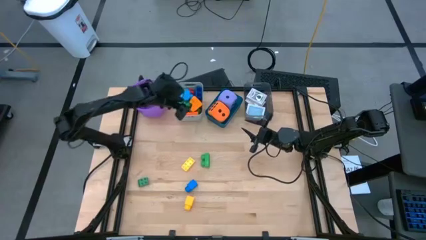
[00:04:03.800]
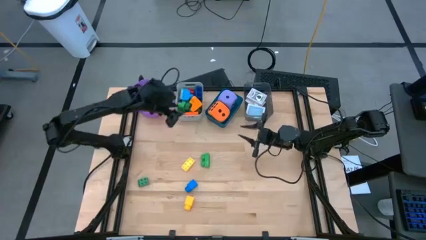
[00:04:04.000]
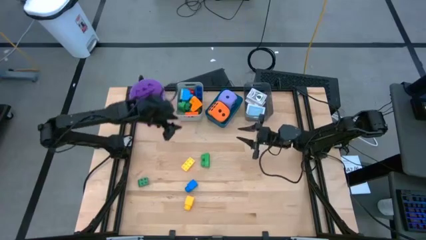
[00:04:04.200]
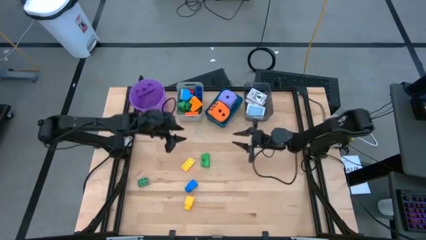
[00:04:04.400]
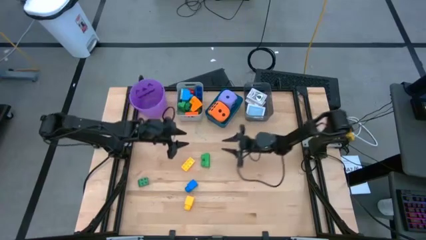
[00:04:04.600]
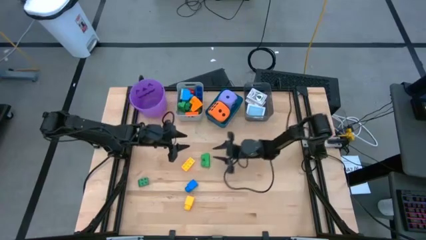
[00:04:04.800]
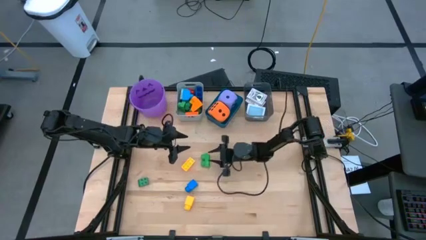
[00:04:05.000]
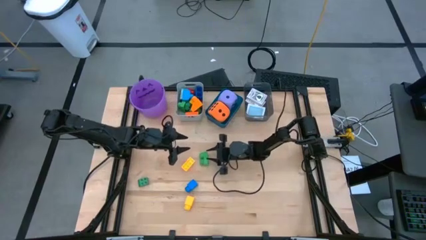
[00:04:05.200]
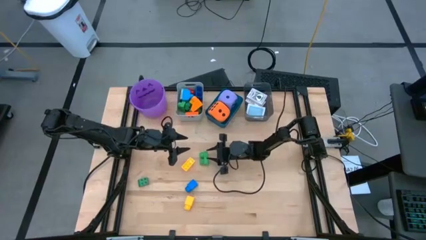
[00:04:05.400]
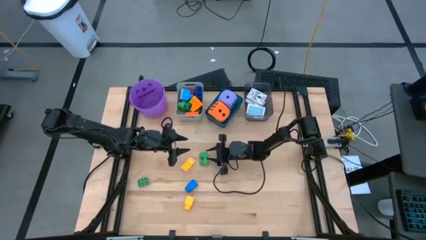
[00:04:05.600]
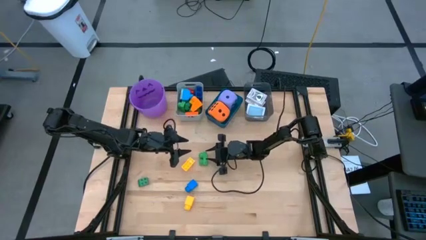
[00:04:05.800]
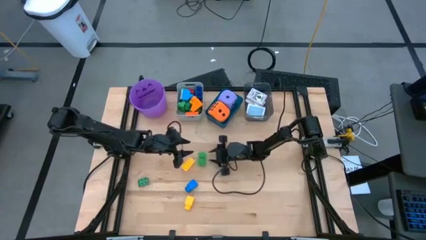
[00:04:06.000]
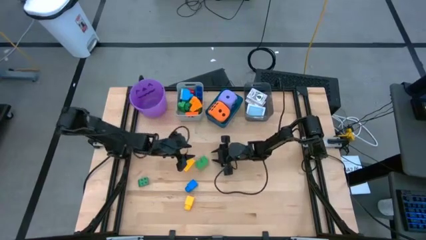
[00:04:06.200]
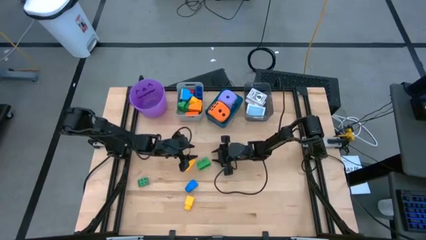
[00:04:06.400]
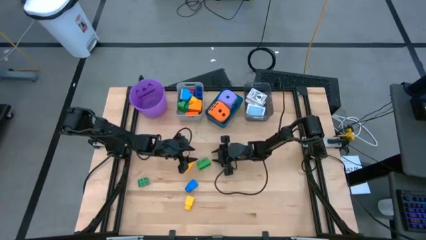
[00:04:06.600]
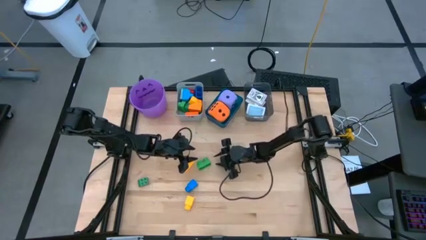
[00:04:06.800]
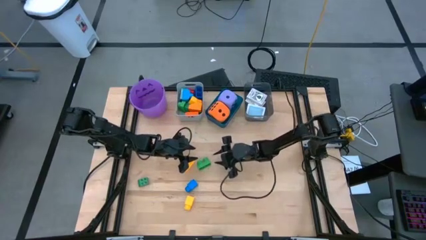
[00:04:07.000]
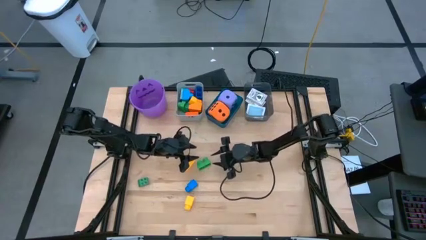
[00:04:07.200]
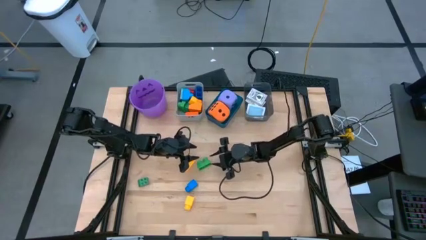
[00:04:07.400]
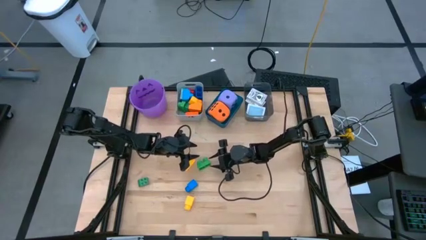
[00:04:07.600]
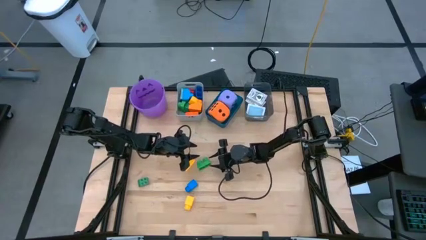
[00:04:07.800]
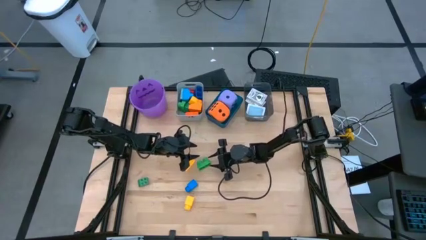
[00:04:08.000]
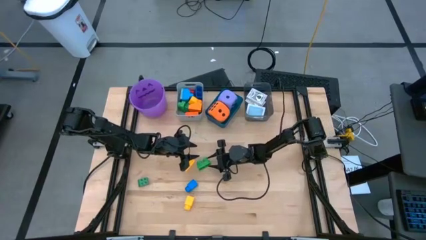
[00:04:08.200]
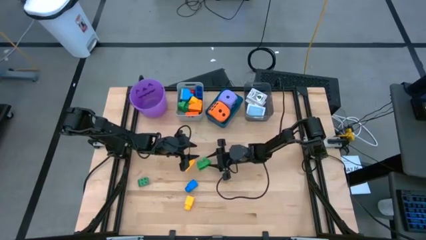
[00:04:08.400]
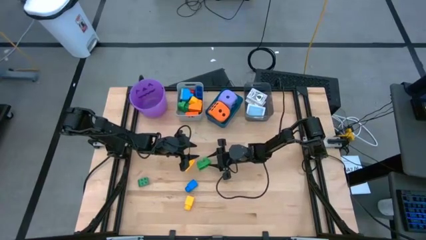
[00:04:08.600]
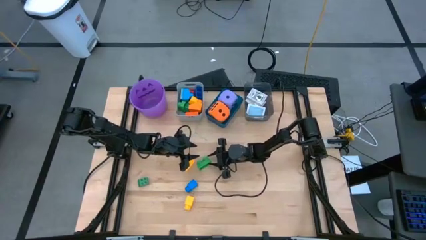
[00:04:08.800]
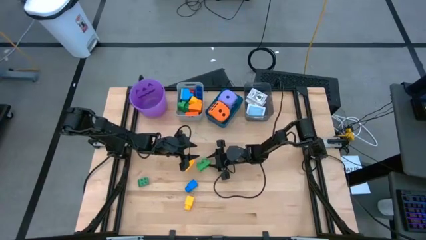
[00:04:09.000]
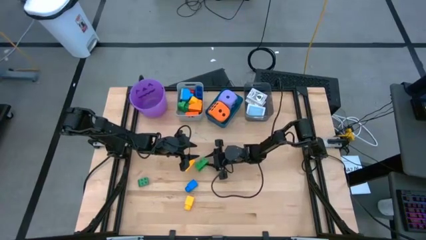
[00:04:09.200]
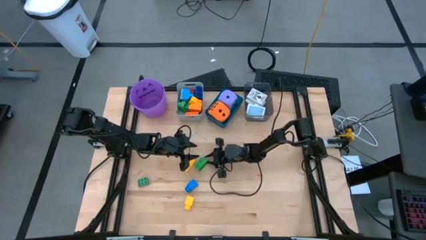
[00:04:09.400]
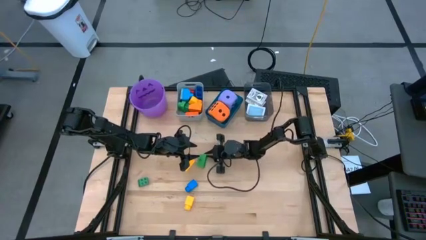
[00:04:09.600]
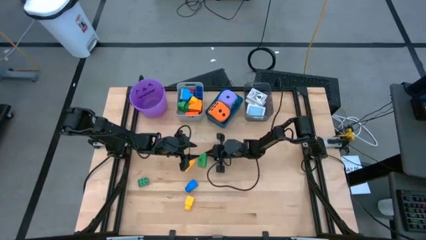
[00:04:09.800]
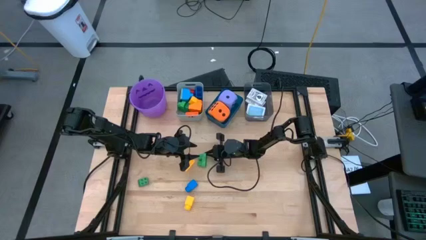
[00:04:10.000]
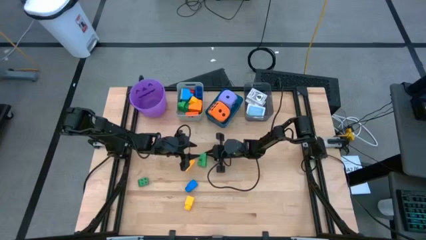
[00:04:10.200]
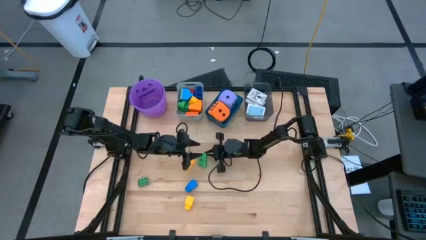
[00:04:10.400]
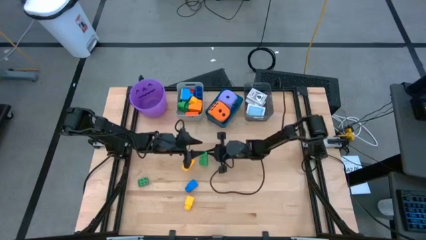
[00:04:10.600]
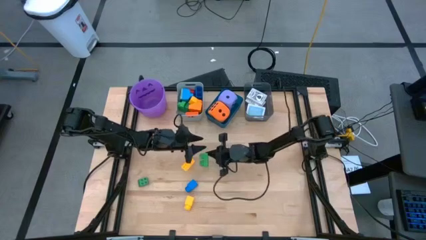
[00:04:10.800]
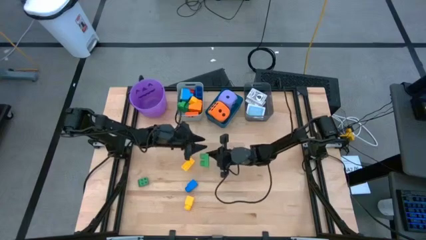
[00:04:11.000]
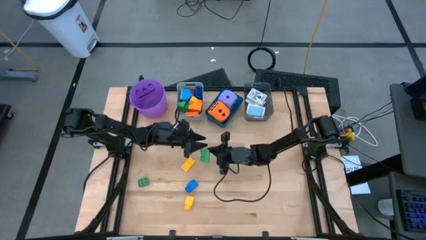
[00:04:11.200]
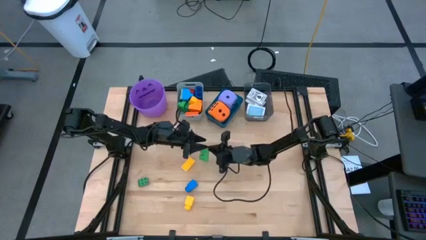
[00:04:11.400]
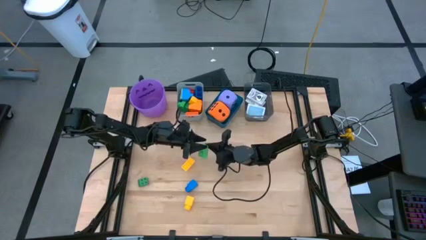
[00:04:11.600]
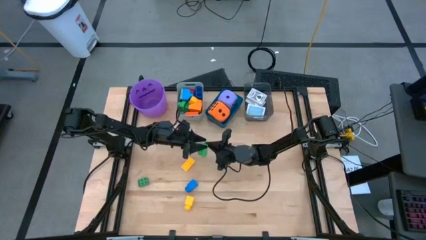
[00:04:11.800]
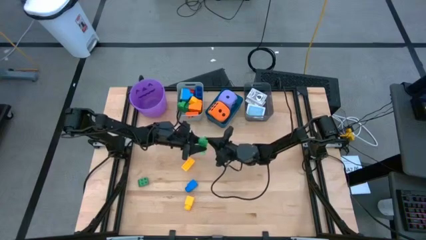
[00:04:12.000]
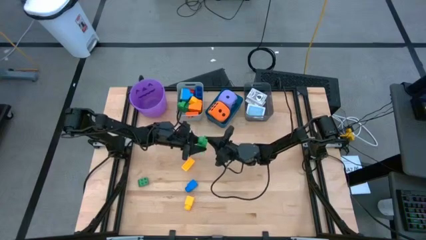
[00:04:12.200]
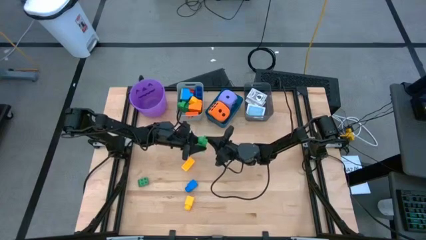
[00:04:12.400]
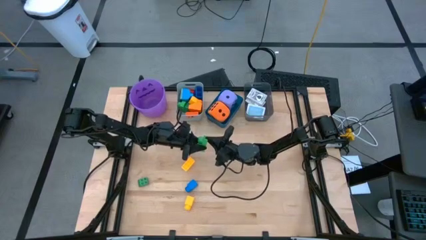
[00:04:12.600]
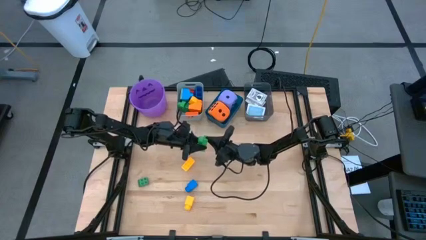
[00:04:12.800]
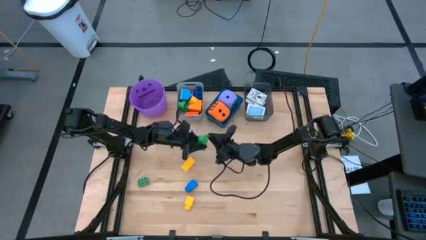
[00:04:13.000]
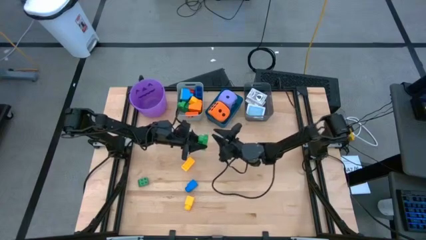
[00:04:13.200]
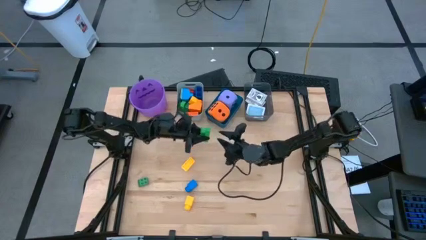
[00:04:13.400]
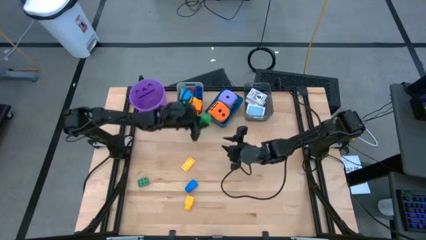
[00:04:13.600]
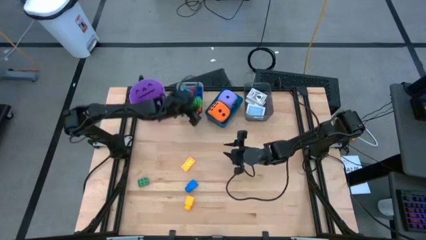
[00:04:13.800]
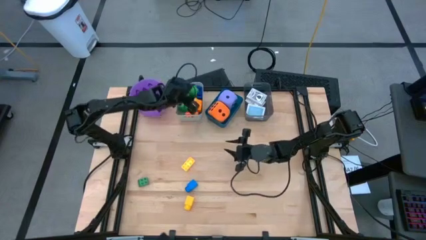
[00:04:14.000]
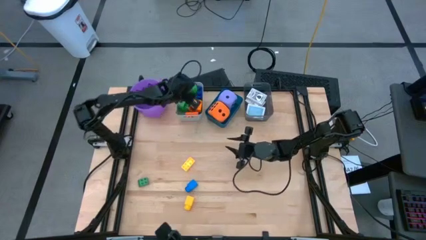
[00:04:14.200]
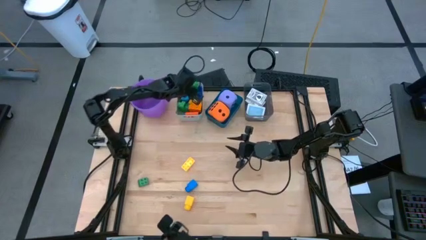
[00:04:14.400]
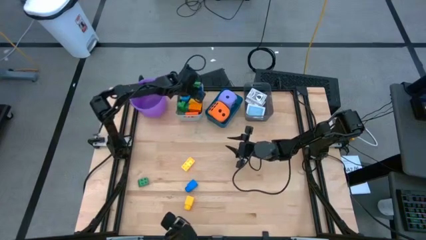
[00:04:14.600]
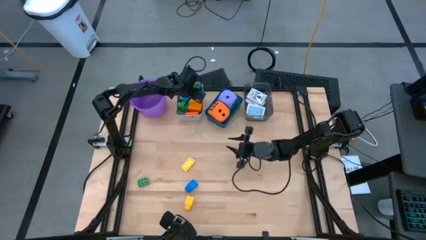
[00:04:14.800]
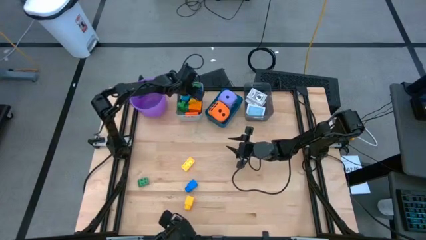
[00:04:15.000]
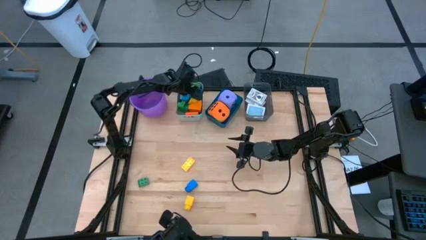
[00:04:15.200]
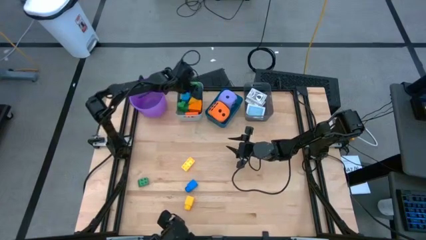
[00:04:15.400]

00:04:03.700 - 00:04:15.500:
Task: Pick & Place Toys
Put the green game piece into the gray bin

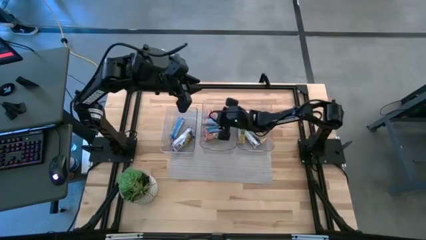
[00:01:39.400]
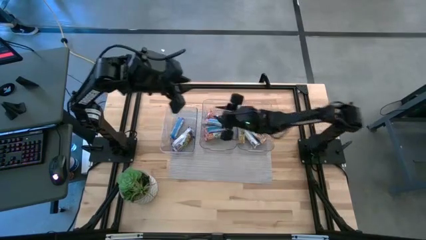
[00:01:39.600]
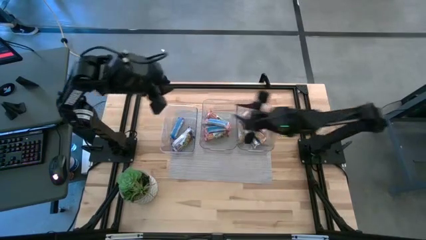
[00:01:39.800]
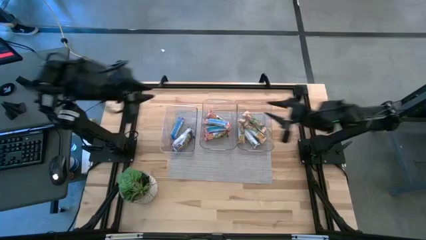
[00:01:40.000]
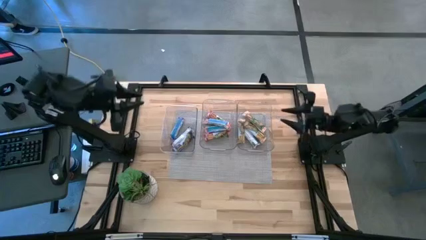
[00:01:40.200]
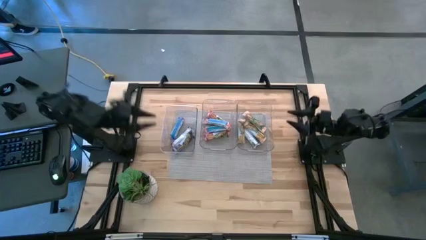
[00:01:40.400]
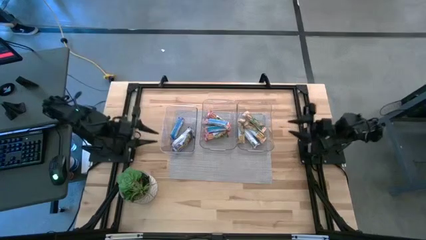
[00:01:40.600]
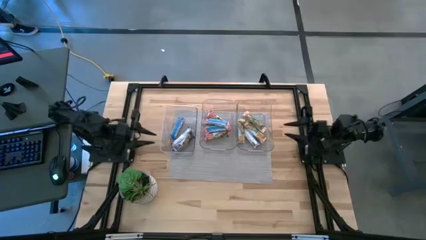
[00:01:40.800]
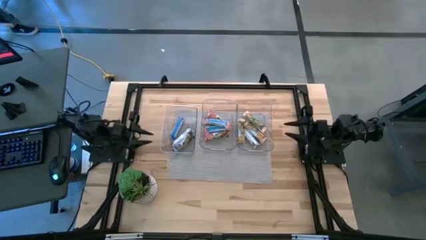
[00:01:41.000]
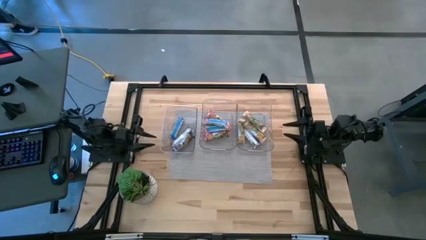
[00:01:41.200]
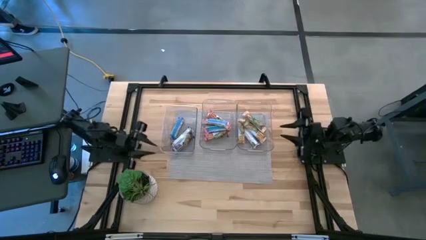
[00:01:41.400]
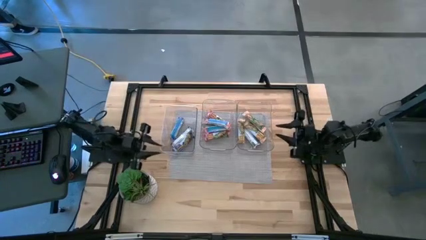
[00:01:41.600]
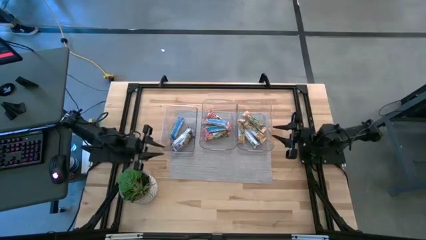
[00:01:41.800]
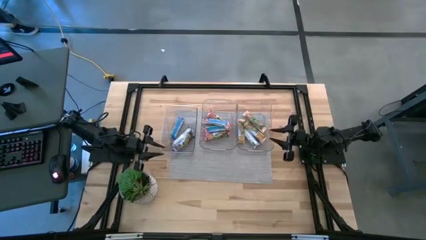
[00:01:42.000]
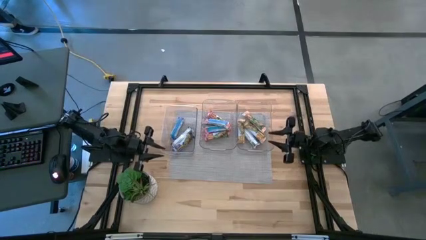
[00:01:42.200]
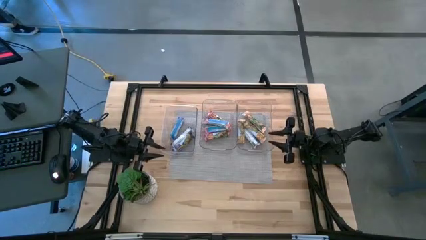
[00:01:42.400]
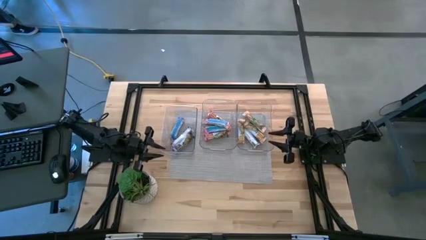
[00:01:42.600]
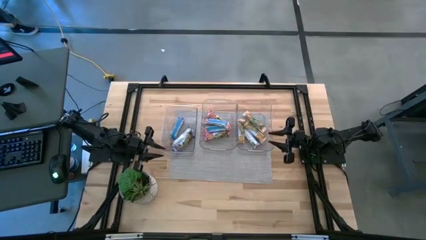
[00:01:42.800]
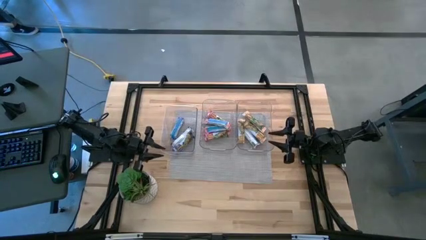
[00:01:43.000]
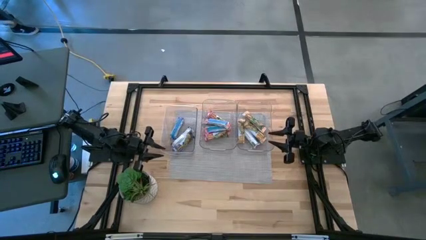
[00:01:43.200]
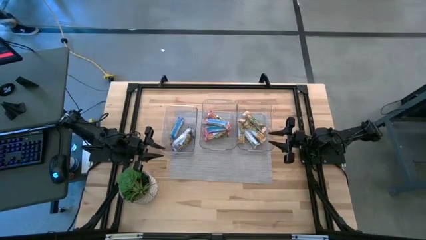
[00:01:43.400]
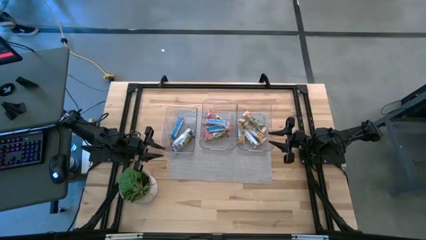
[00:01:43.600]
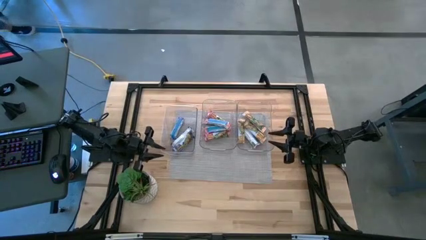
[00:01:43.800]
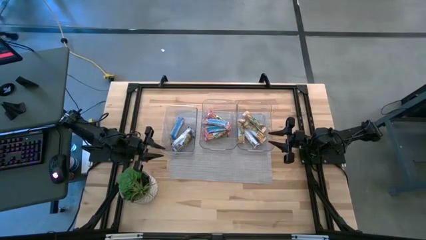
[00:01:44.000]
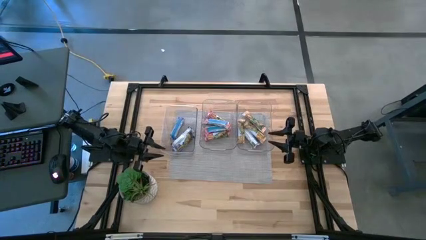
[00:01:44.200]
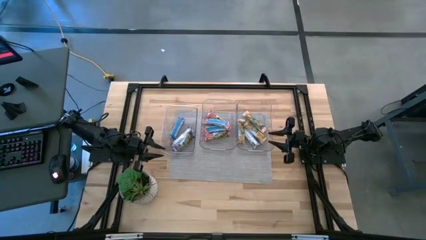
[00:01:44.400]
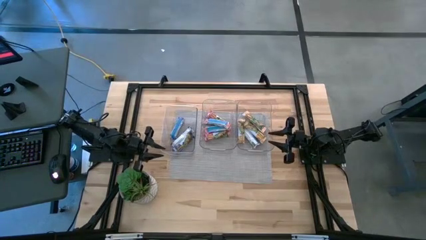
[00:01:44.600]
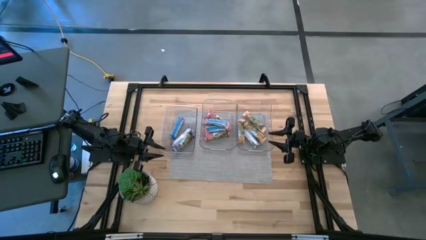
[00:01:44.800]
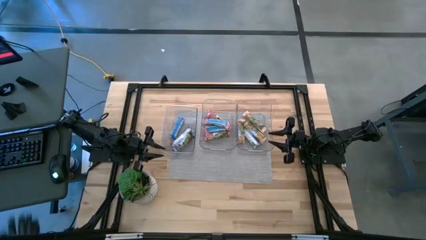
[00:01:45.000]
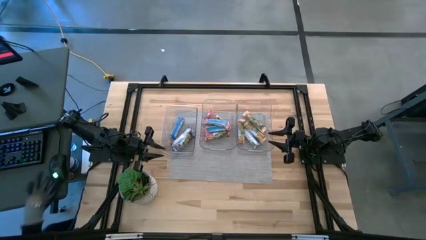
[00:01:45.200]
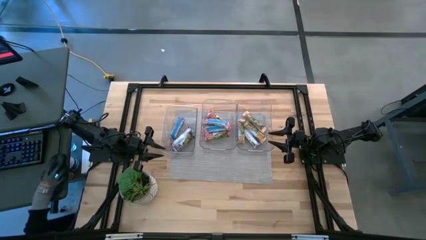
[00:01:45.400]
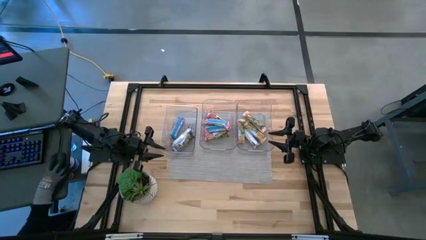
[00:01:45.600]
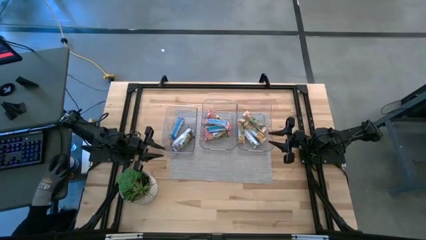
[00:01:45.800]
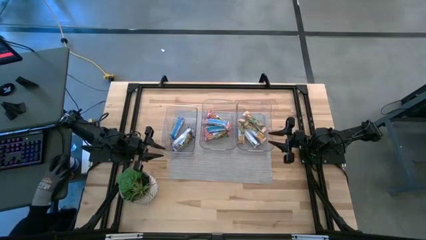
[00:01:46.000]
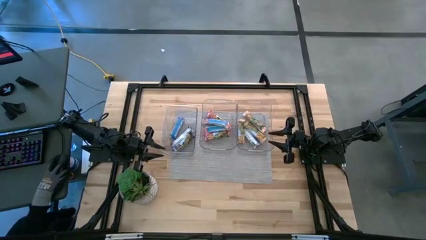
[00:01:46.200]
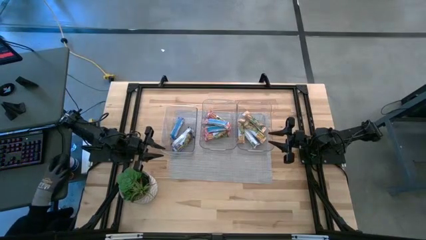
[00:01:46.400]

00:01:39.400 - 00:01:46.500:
Task: Pick and place Granola Bars by type
Return to Home Position
